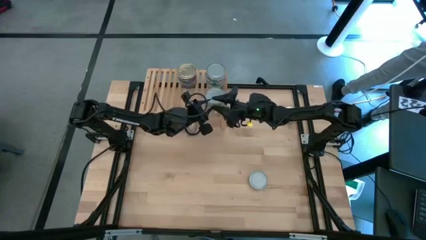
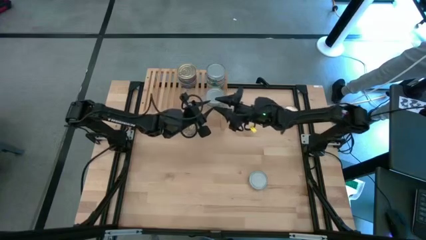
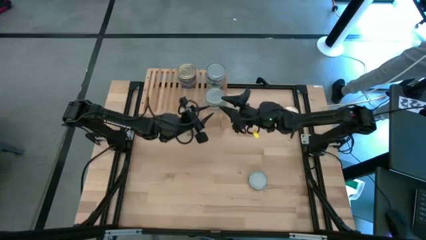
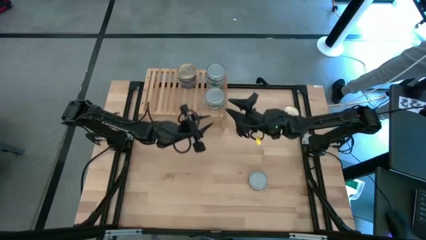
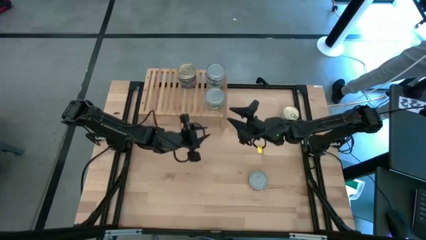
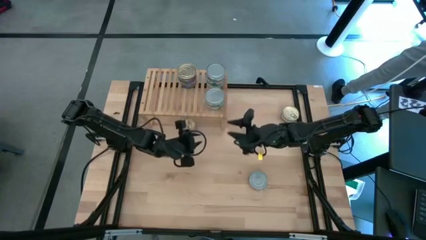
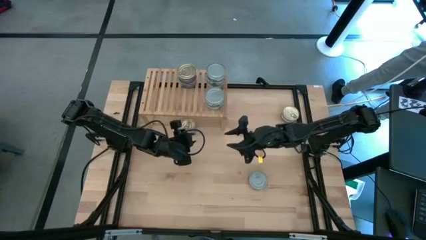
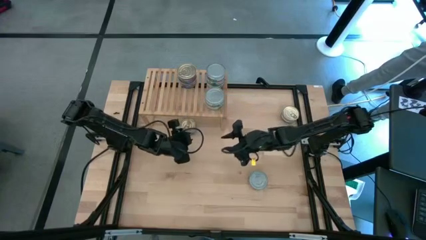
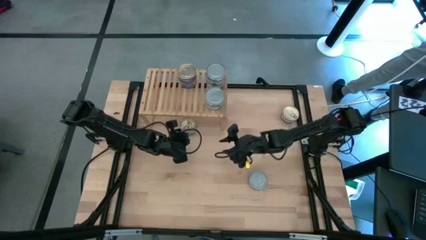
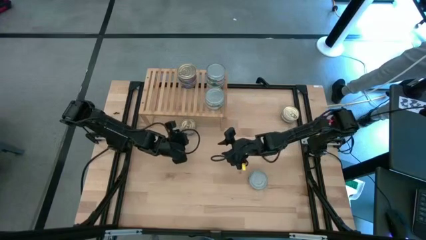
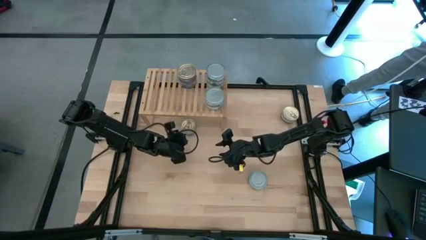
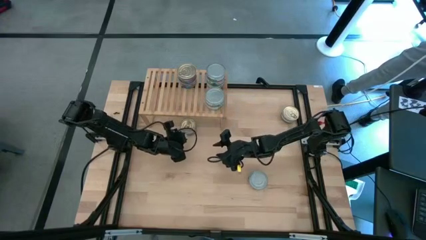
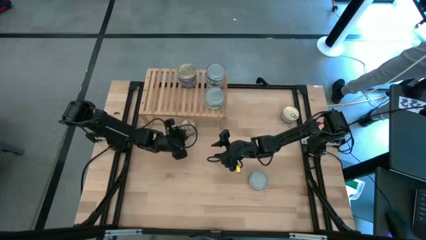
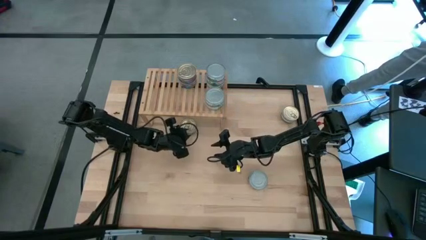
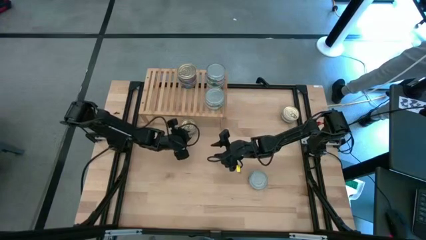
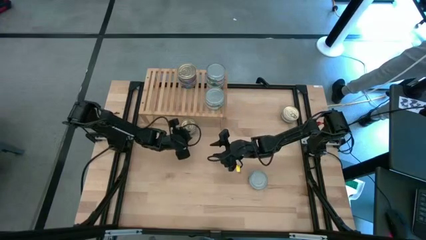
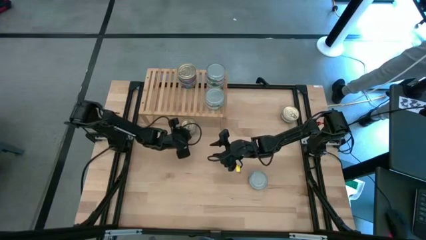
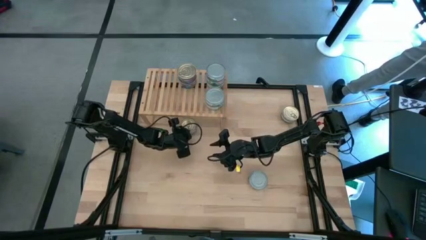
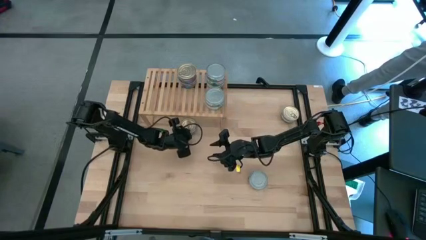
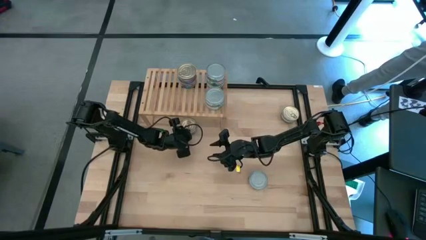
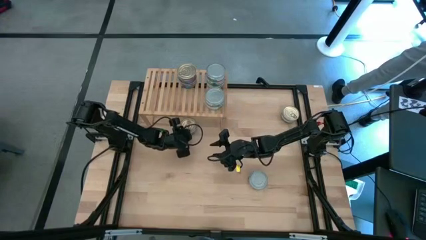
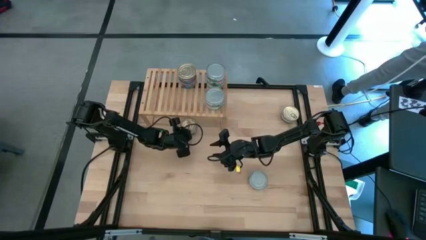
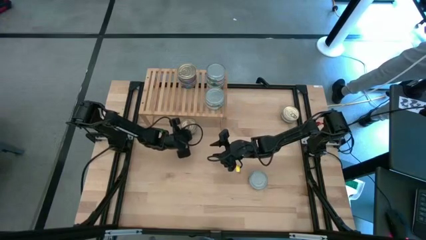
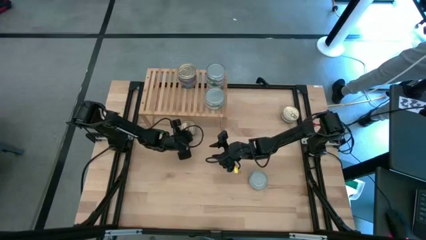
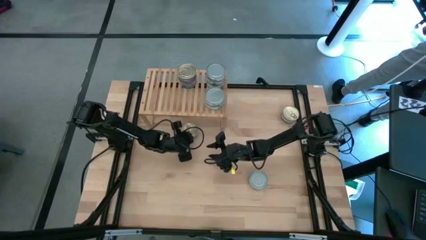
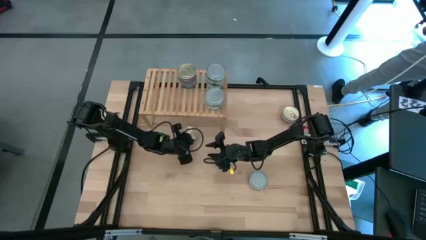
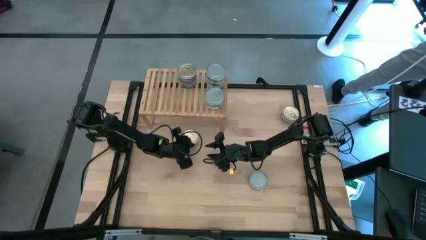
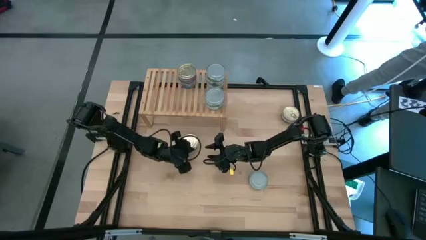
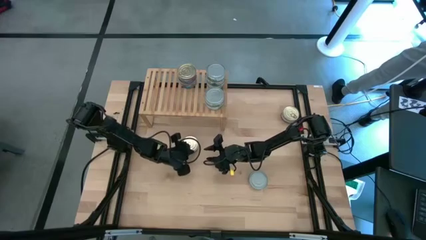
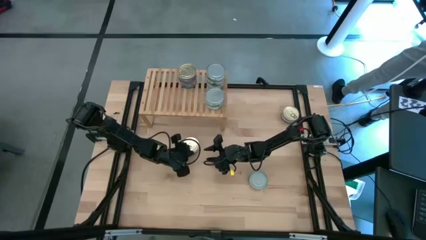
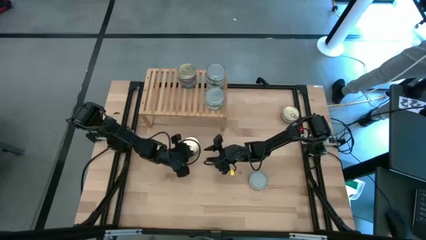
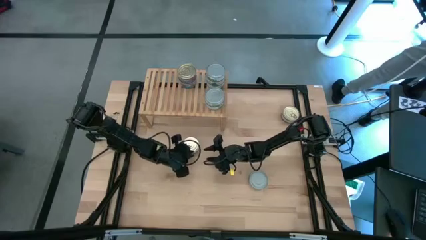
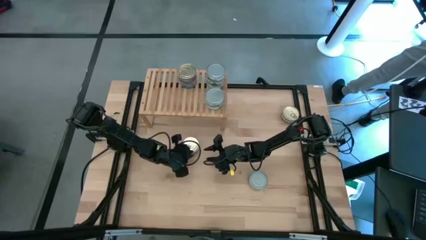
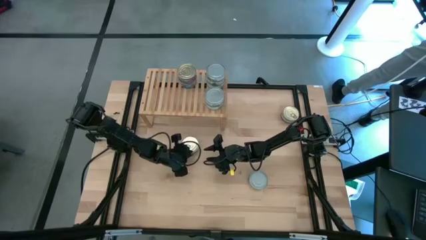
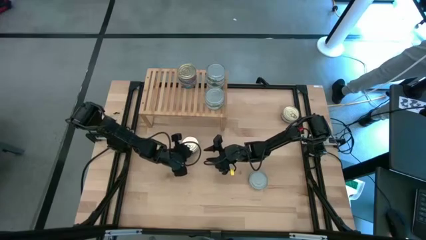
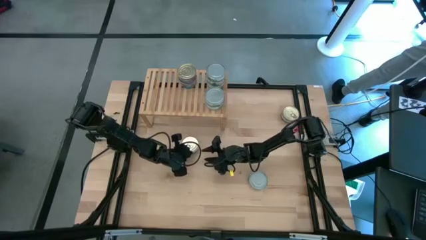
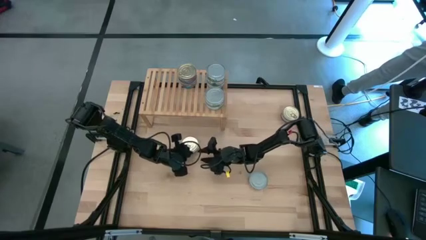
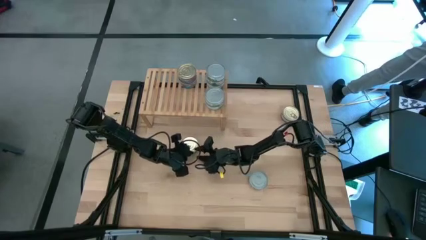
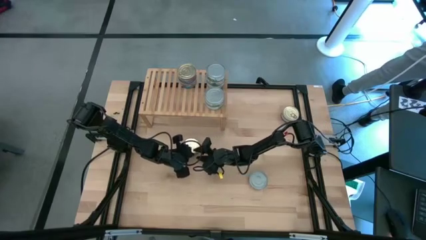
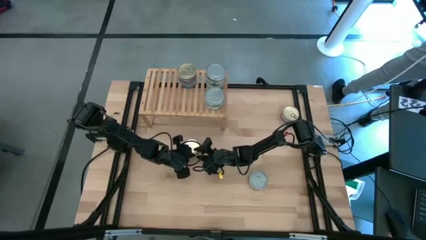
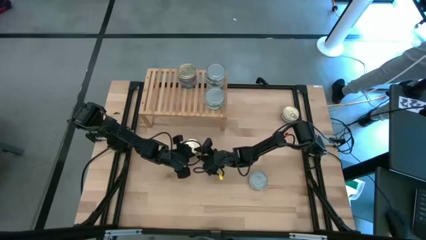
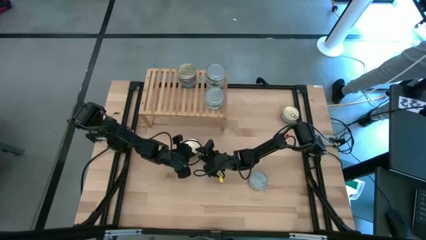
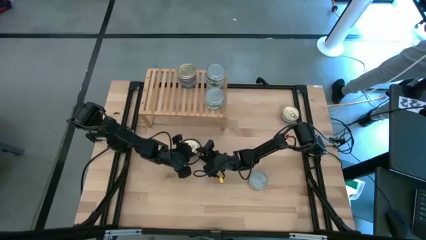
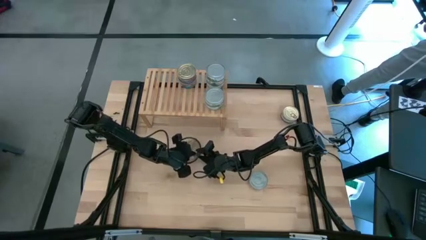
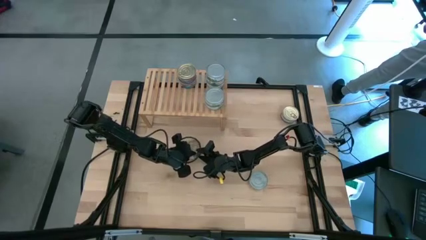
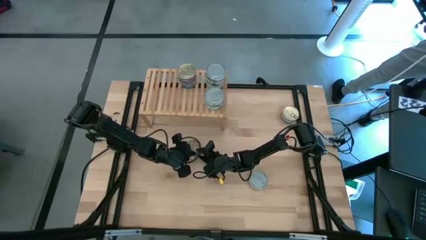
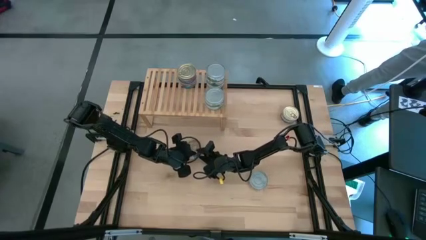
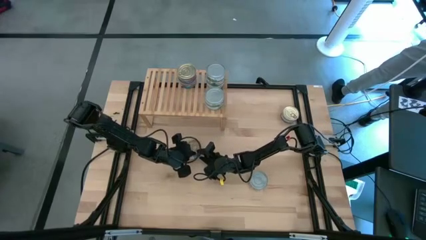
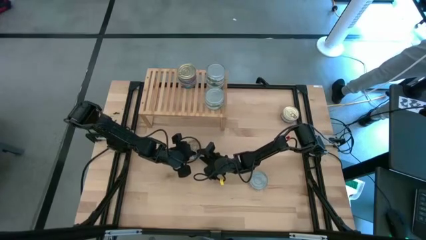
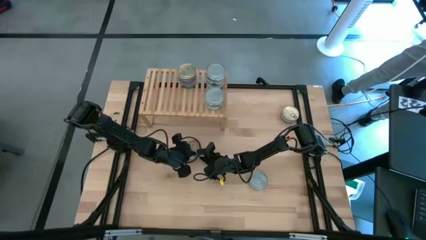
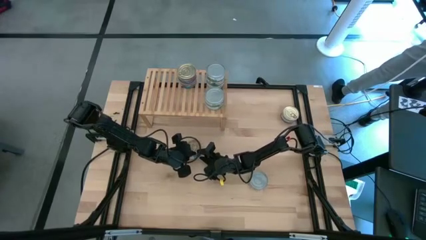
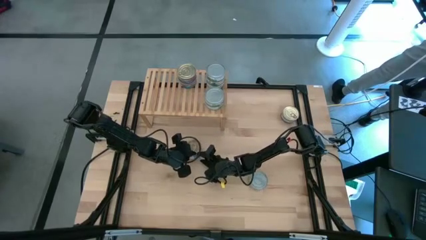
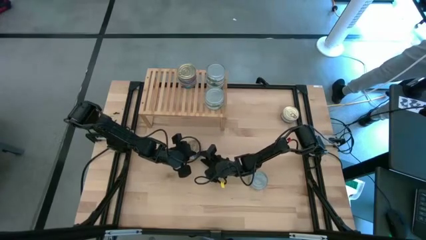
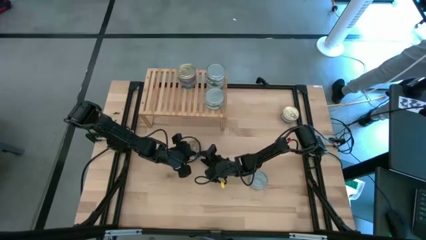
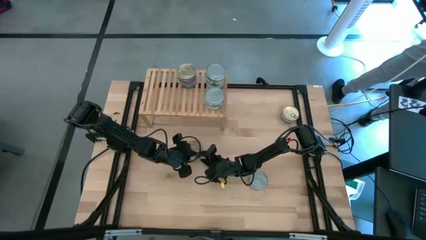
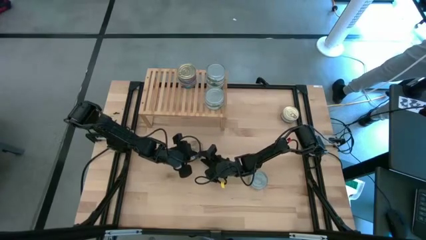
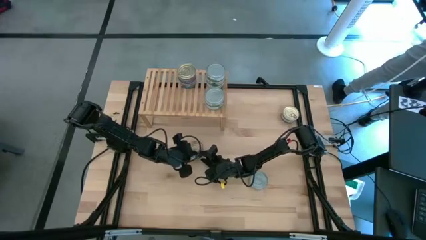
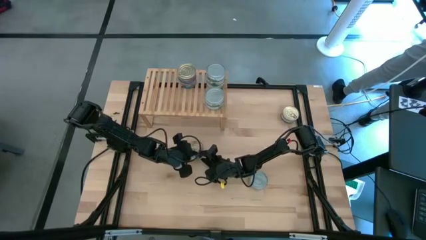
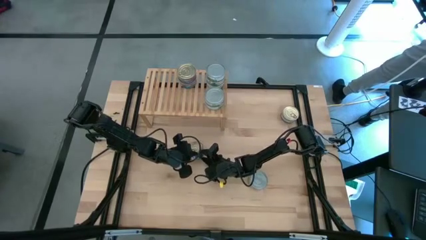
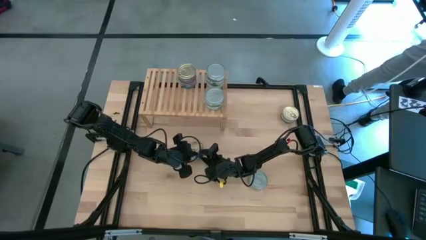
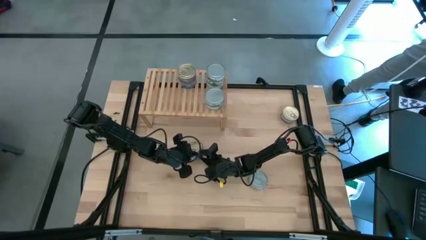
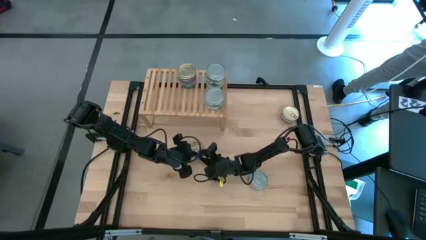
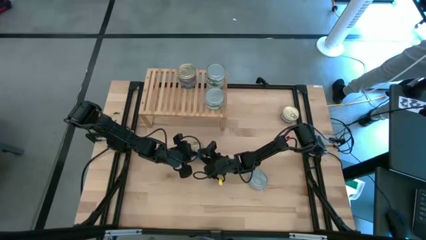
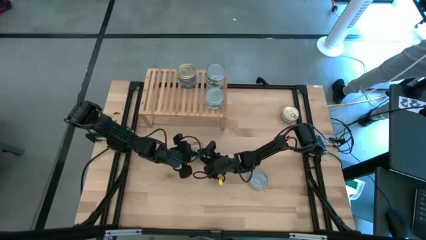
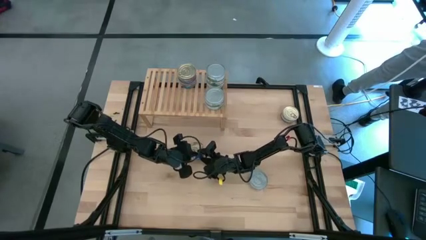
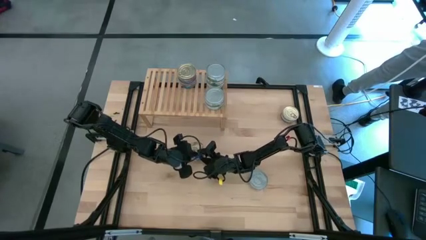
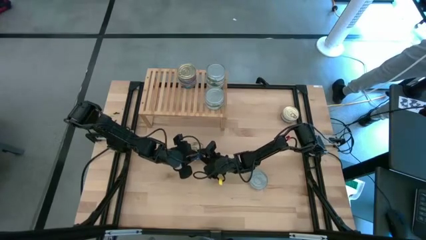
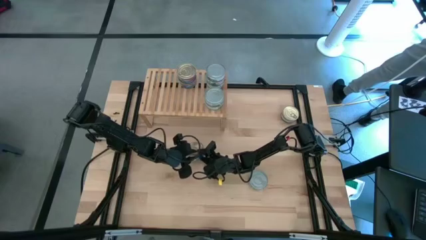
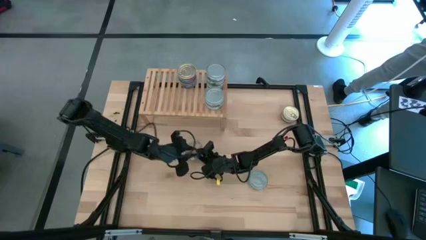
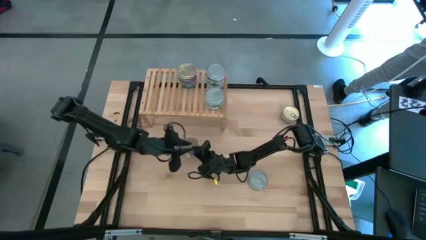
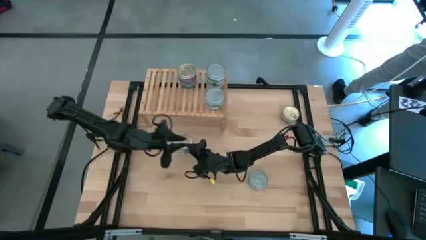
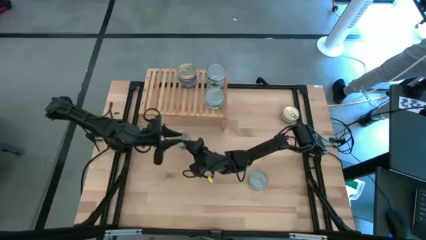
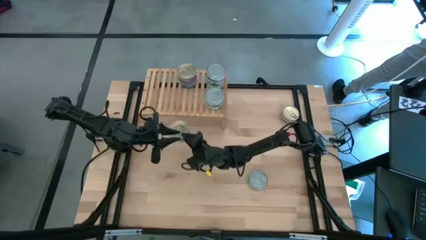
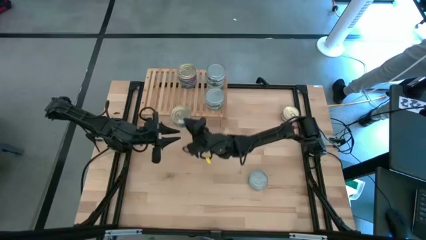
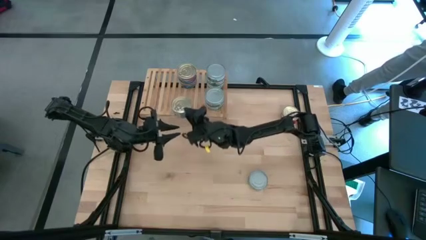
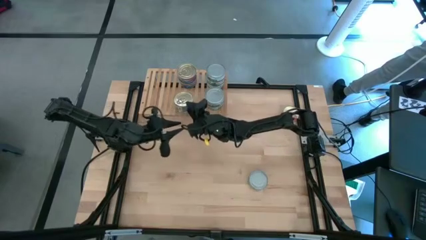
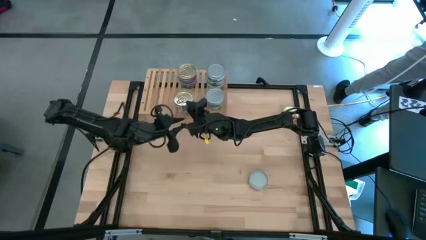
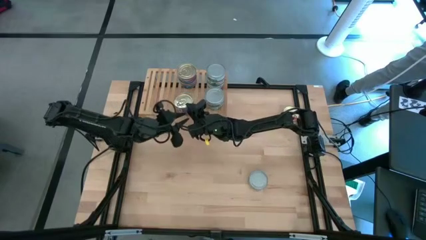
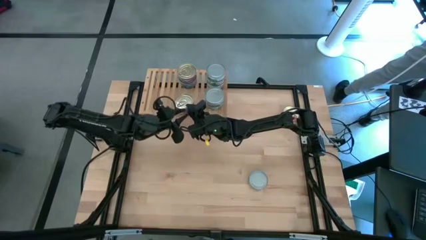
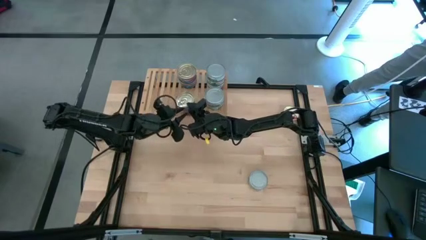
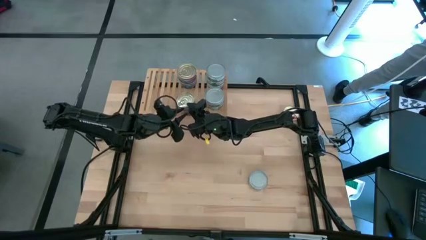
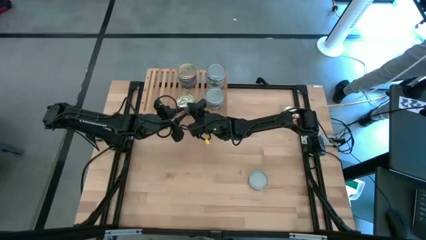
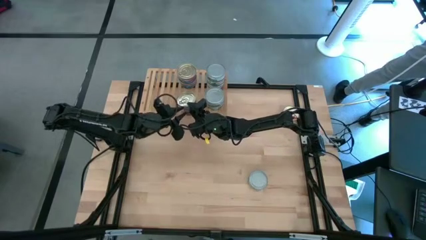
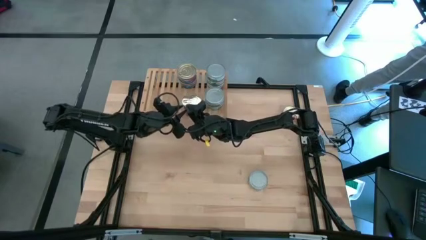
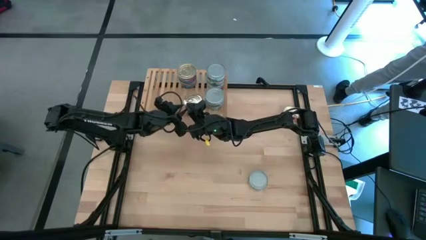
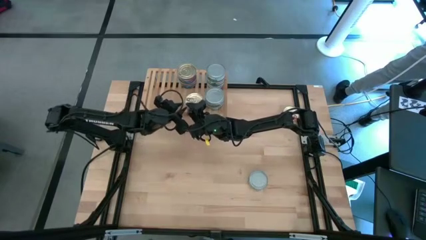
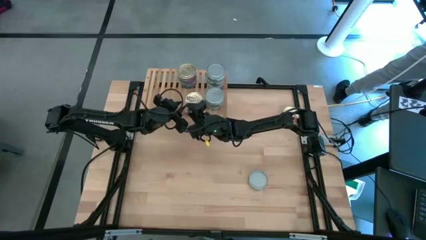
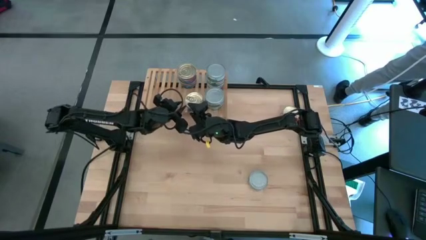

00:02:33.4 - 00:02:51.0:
Task: Stack canned seafood by type on shelf
Put the blue tuna can on the shelf and align it with the other stacked blue tuna cans
